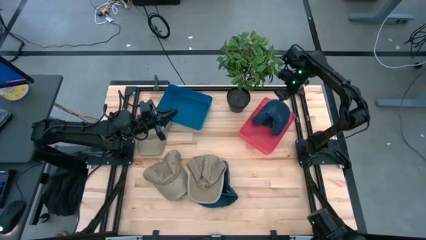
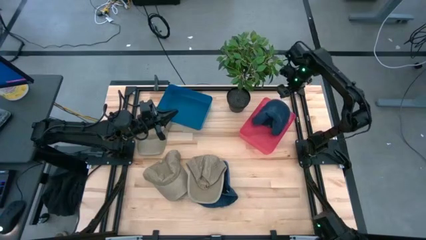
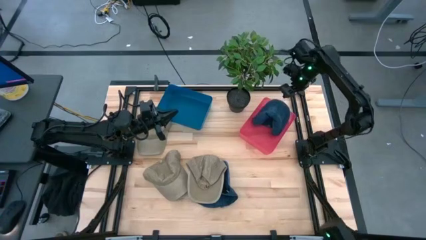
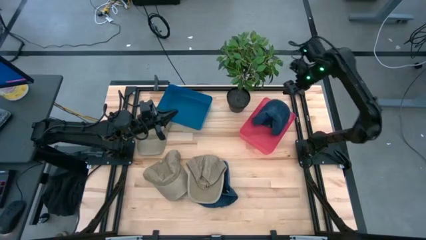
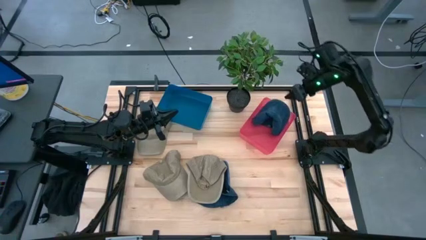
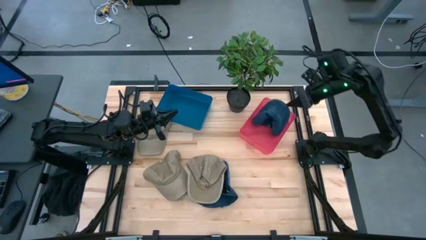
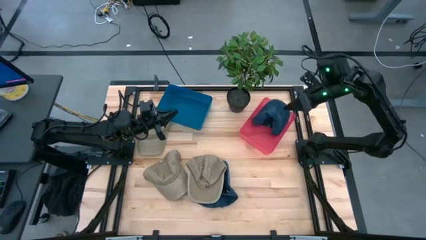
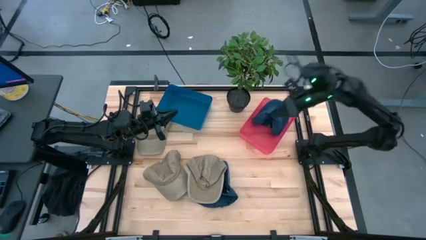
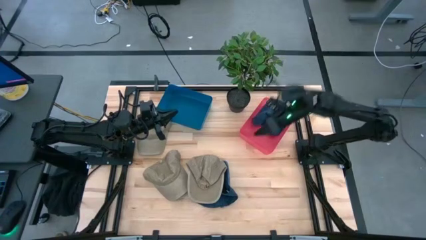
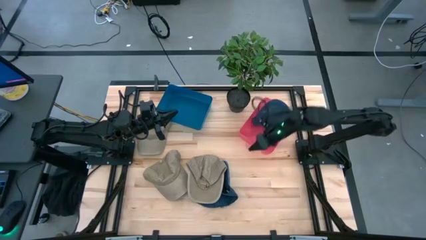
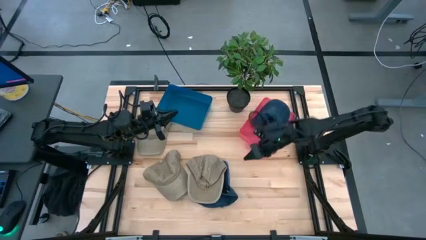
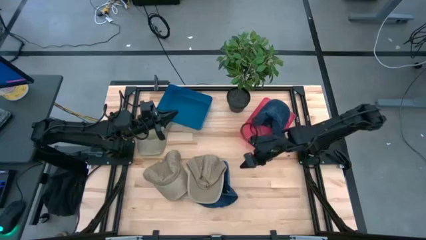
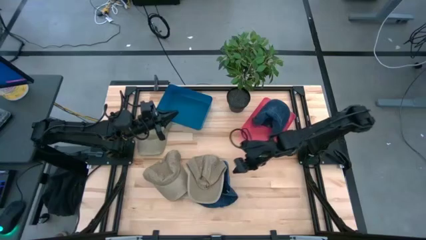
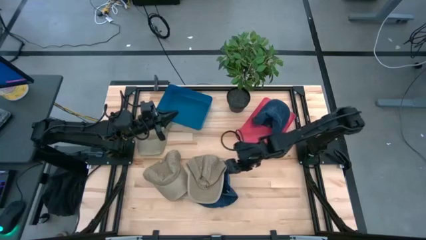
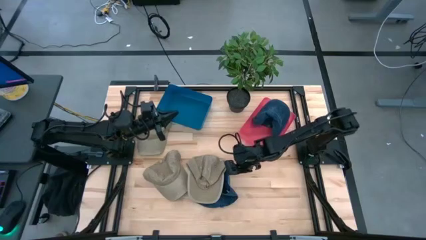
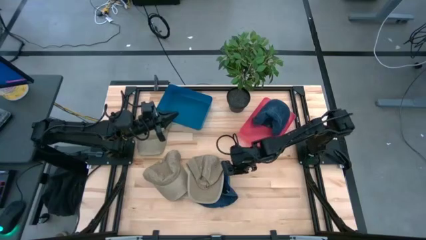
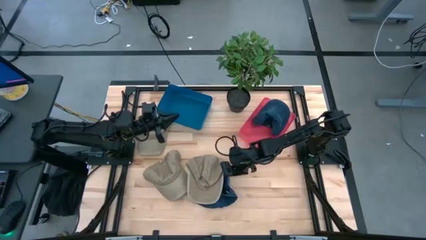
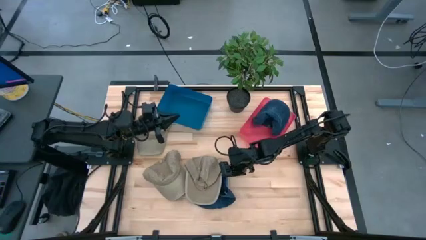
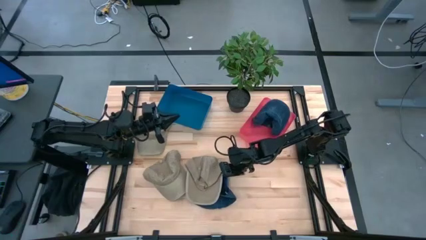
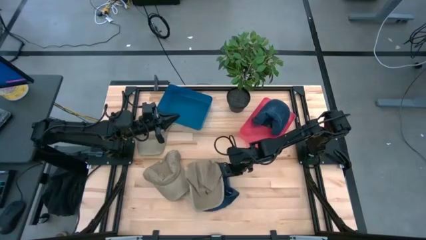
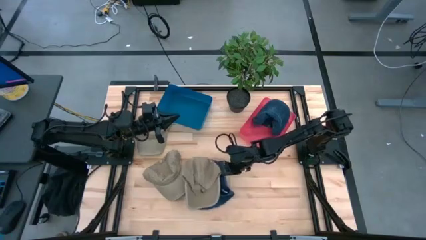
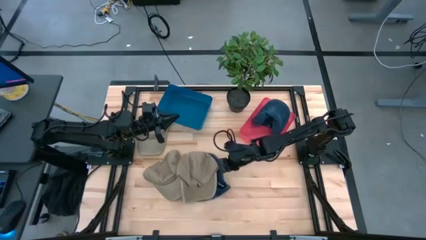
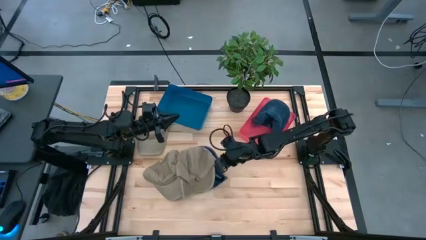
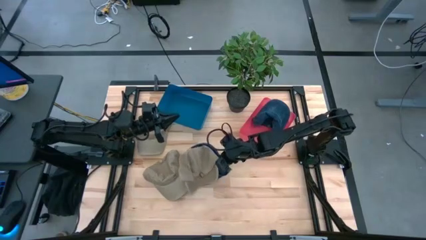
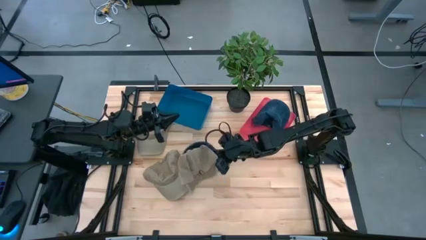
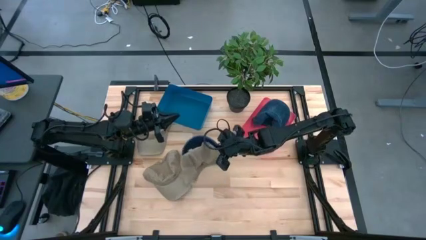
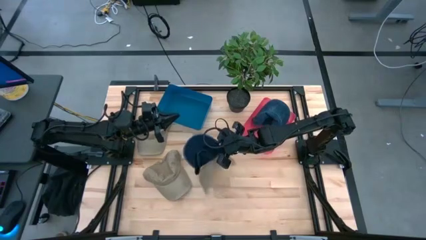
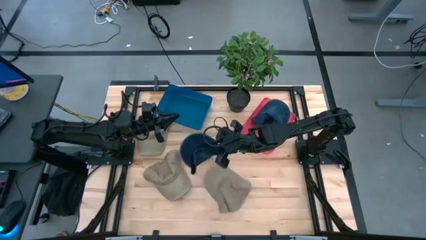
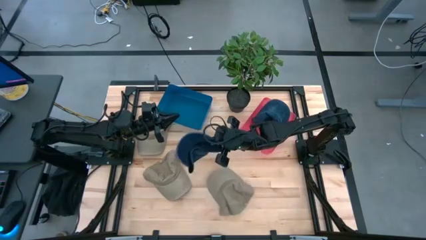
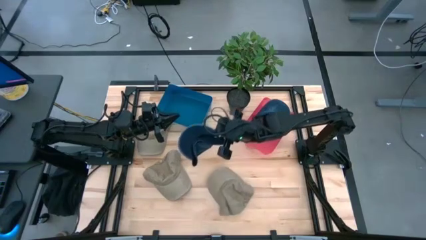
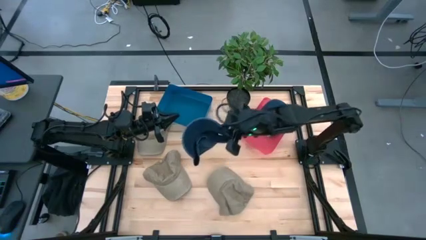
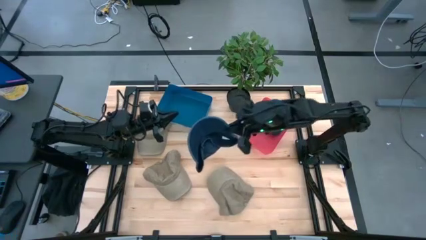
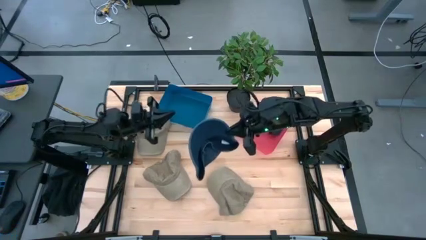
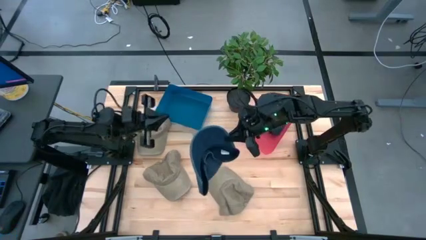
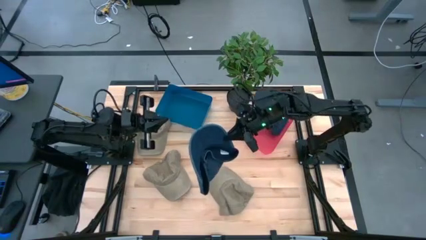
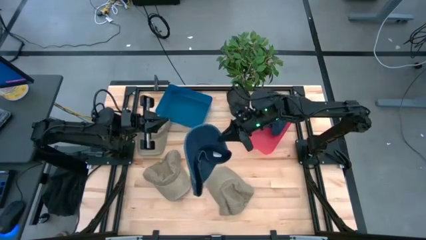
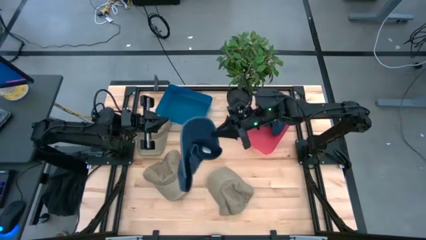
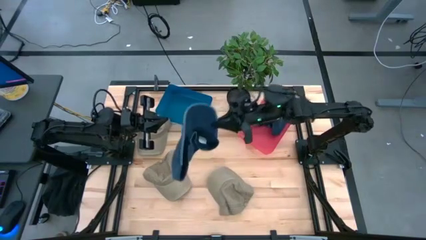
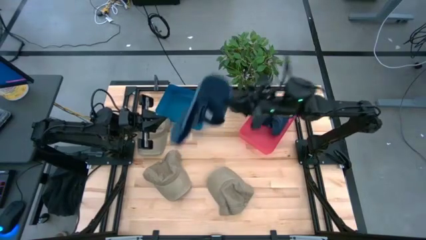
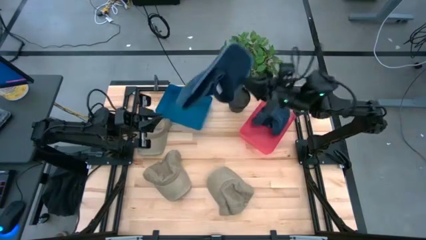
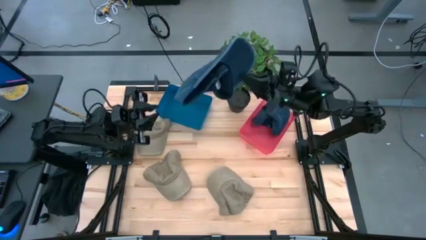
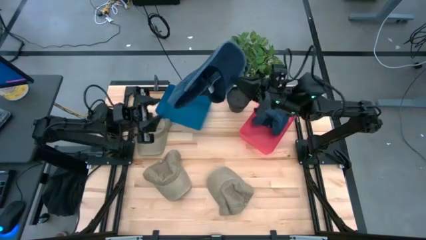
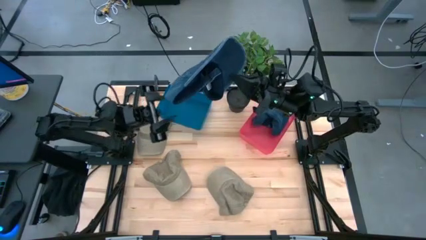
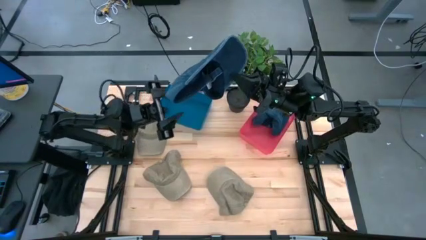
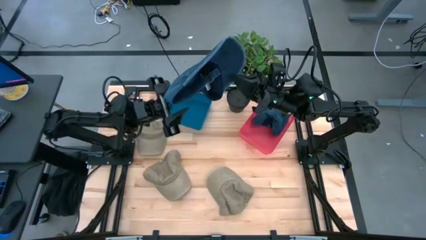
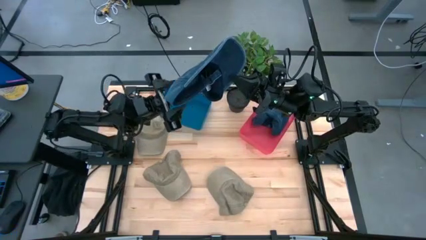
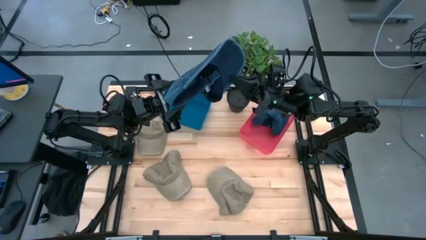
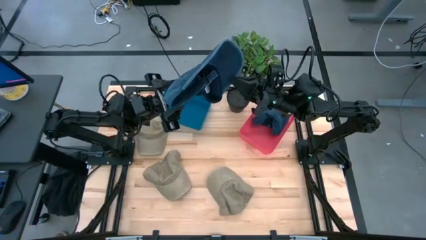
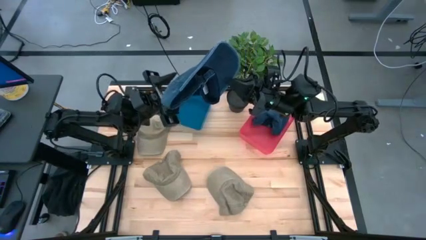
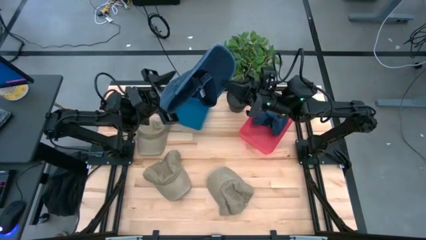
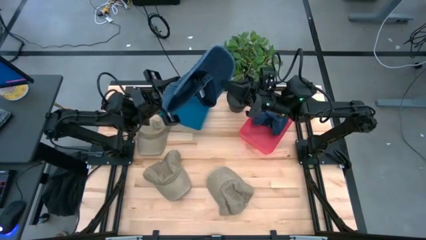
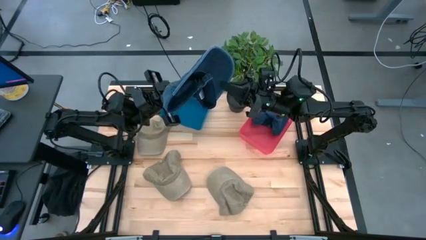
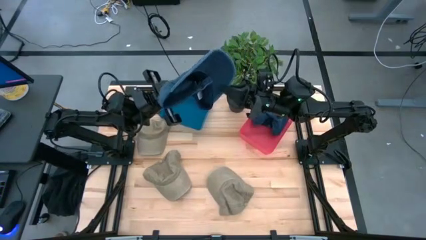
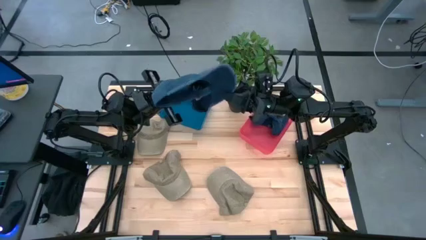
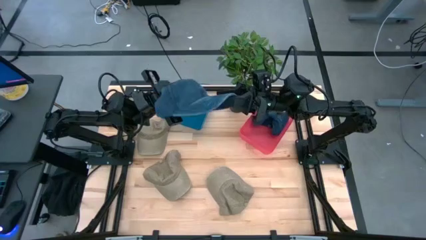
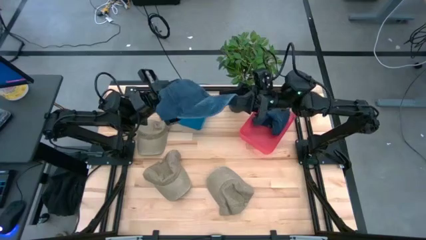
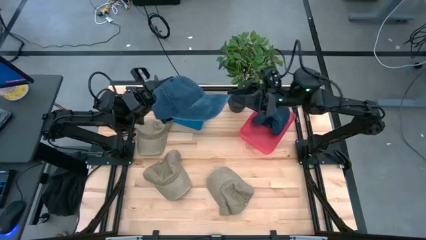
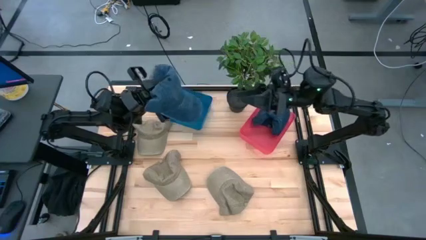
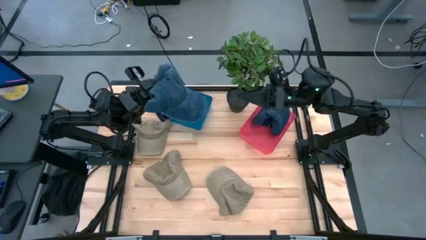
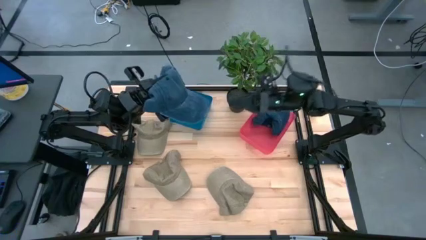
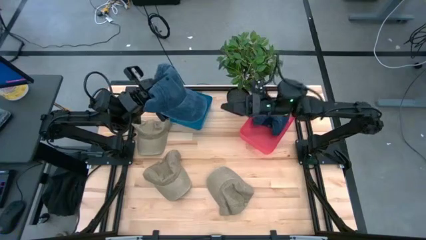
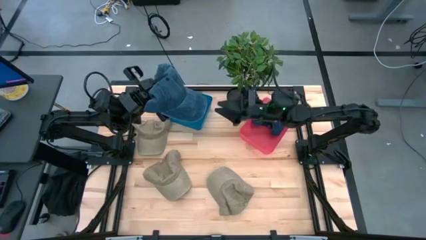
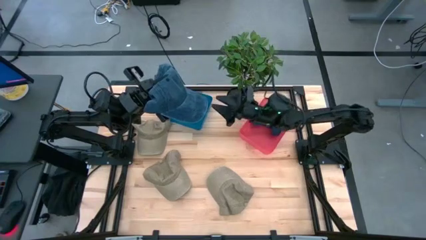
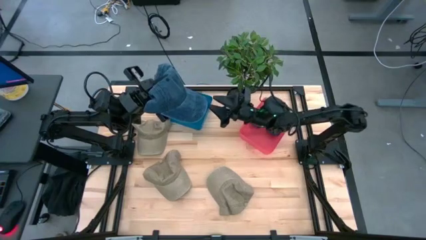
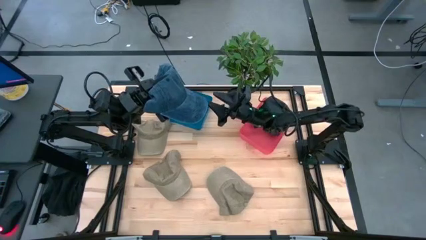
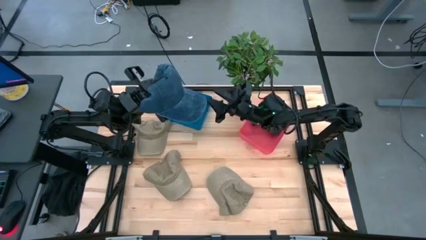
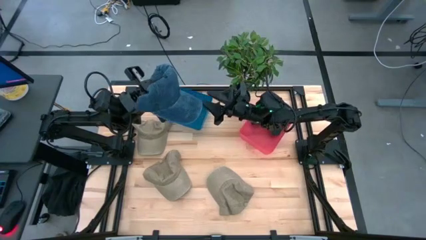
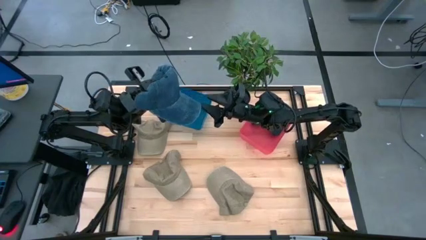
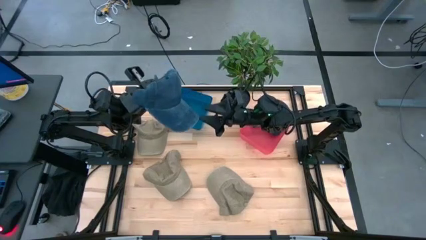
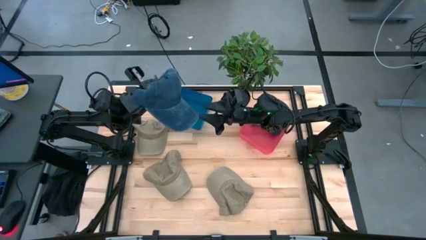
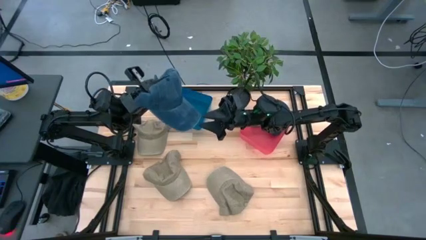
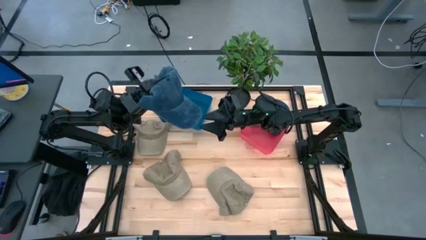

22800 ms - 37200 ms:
Task: Pick & Place hat
Put the blue cap into the red bin
